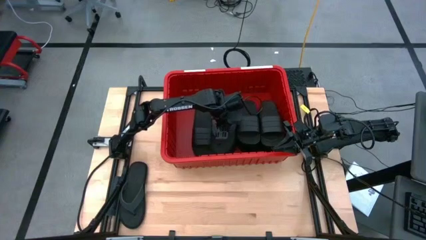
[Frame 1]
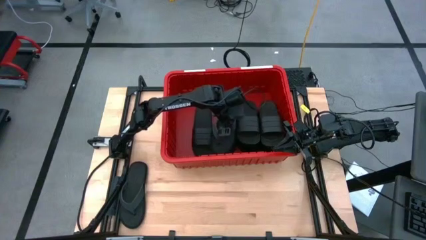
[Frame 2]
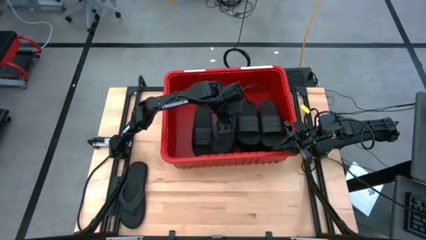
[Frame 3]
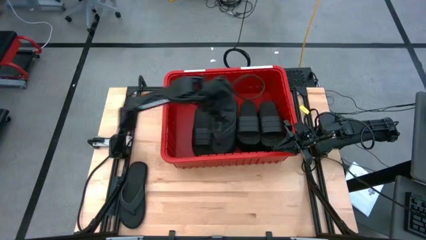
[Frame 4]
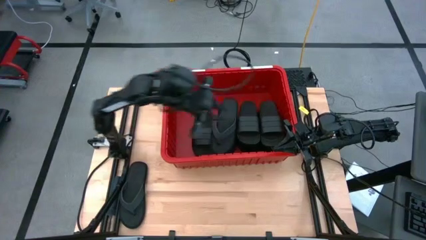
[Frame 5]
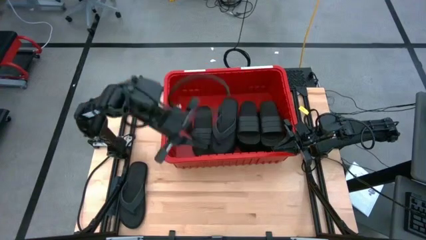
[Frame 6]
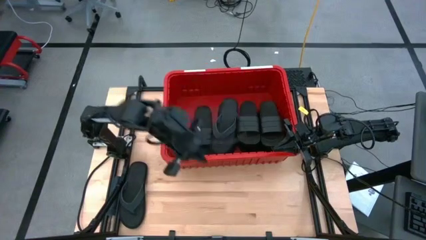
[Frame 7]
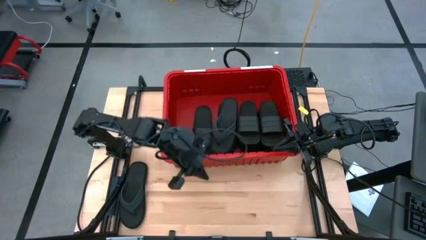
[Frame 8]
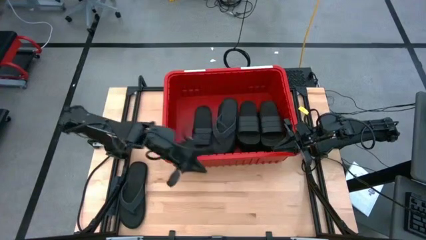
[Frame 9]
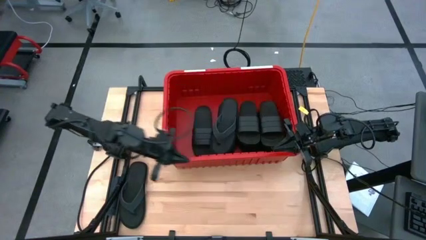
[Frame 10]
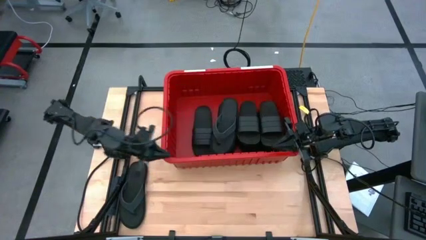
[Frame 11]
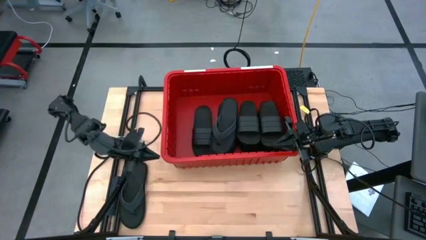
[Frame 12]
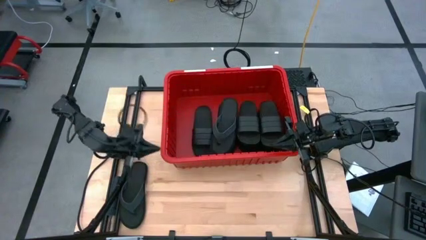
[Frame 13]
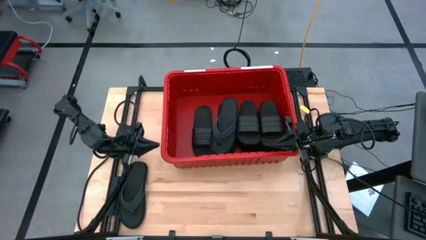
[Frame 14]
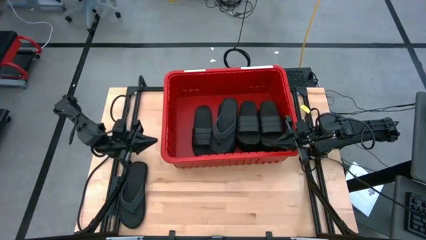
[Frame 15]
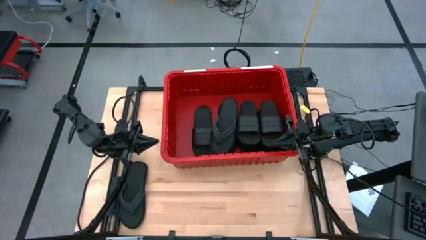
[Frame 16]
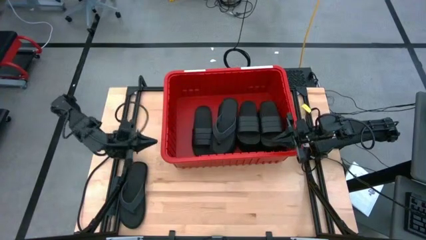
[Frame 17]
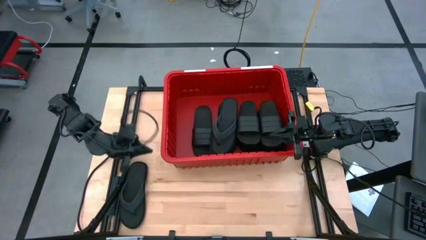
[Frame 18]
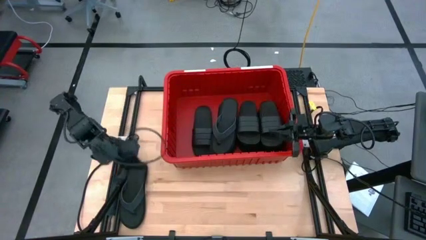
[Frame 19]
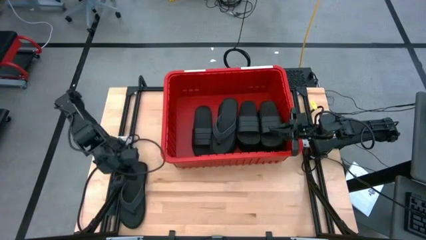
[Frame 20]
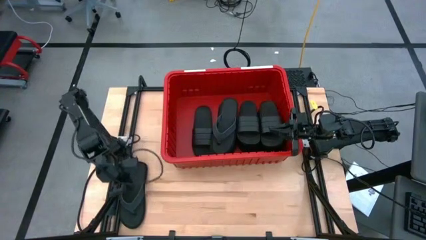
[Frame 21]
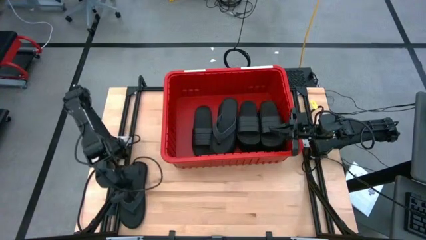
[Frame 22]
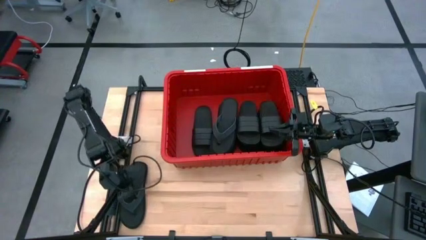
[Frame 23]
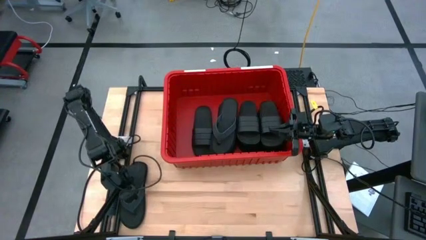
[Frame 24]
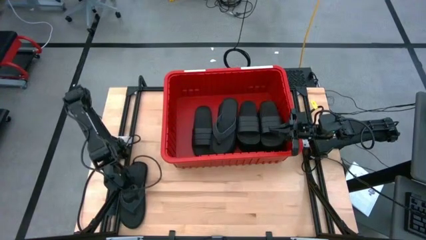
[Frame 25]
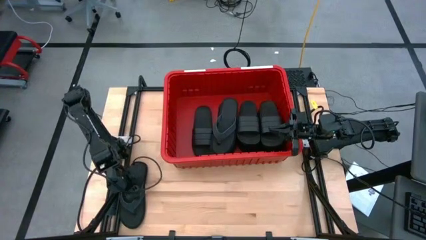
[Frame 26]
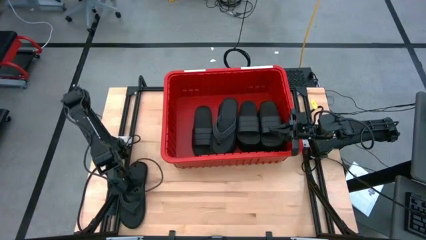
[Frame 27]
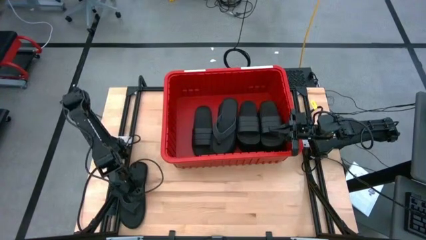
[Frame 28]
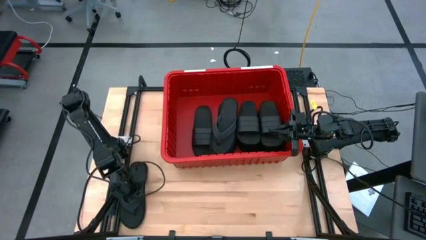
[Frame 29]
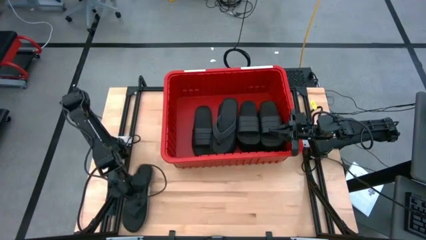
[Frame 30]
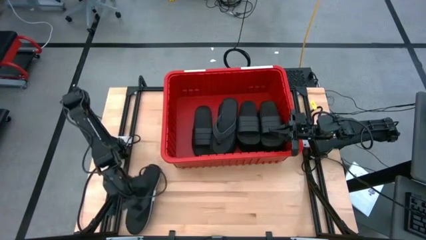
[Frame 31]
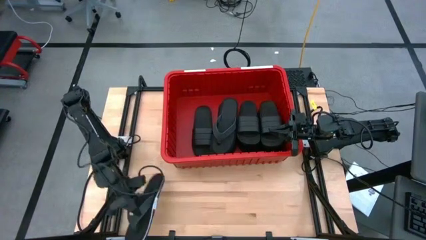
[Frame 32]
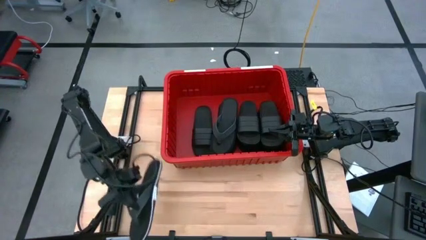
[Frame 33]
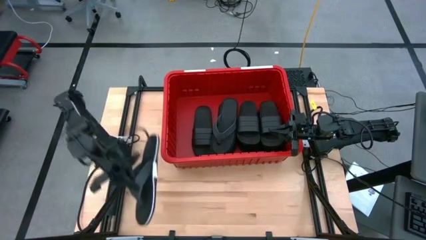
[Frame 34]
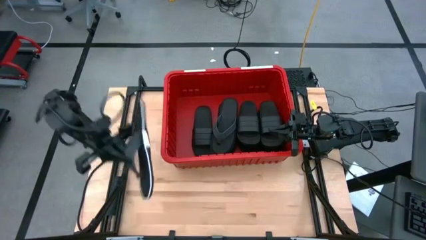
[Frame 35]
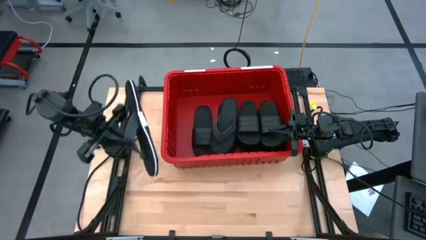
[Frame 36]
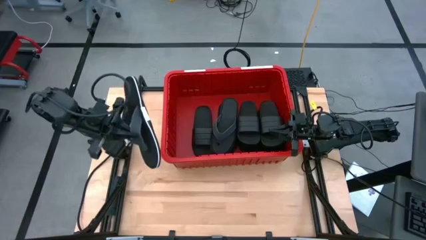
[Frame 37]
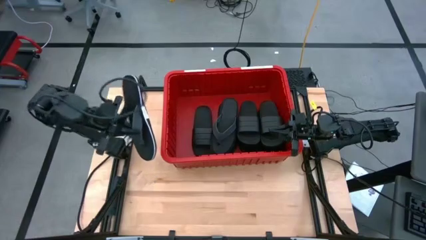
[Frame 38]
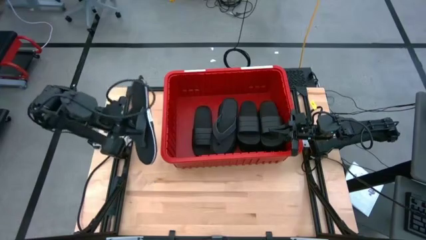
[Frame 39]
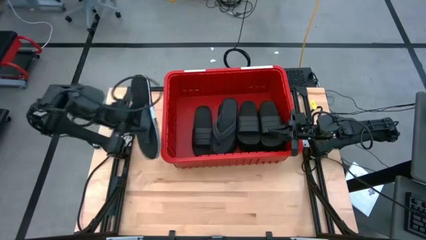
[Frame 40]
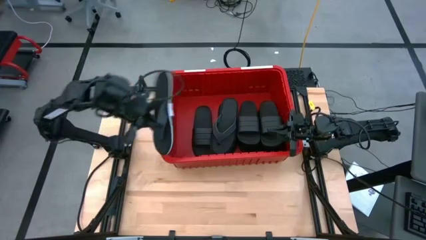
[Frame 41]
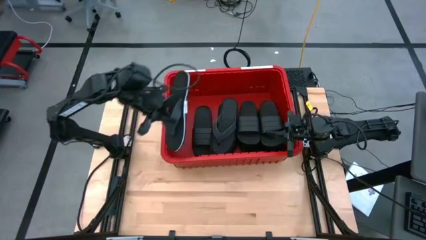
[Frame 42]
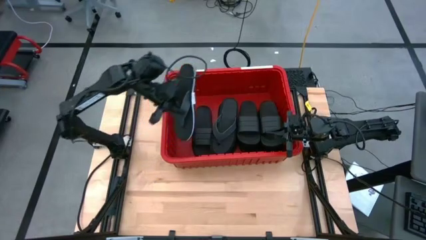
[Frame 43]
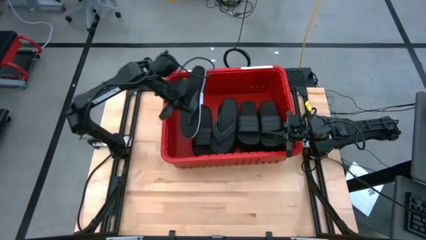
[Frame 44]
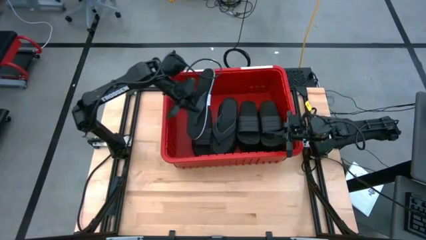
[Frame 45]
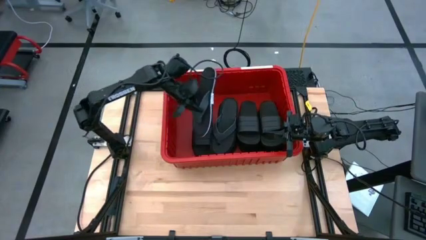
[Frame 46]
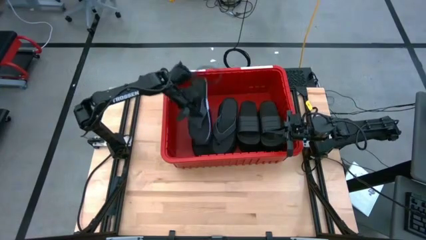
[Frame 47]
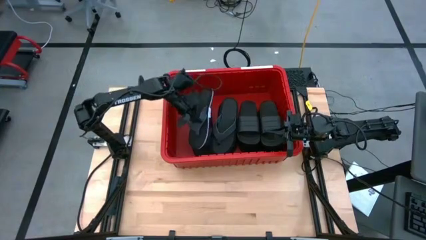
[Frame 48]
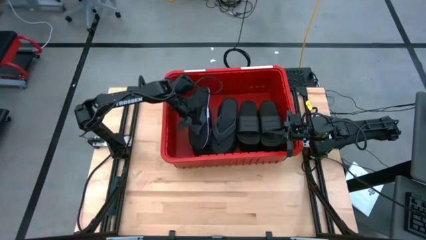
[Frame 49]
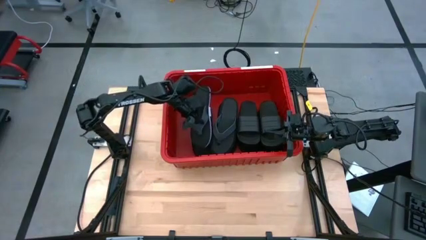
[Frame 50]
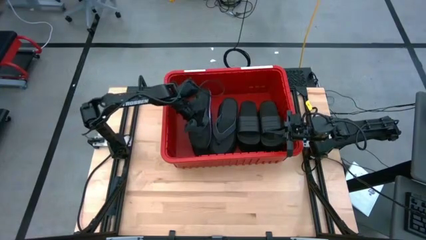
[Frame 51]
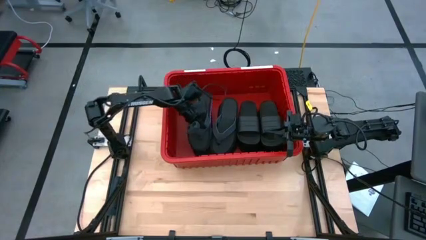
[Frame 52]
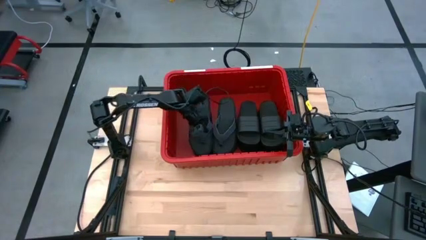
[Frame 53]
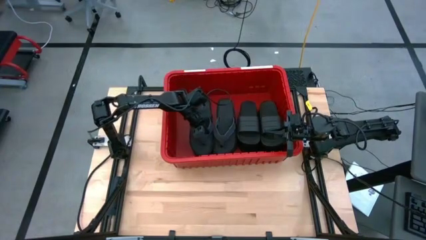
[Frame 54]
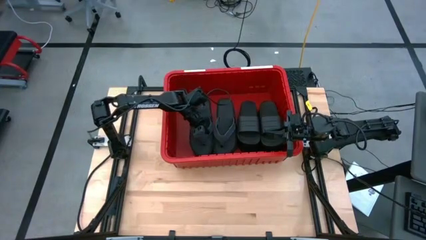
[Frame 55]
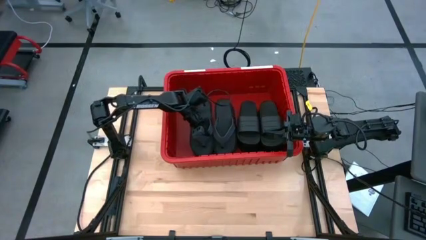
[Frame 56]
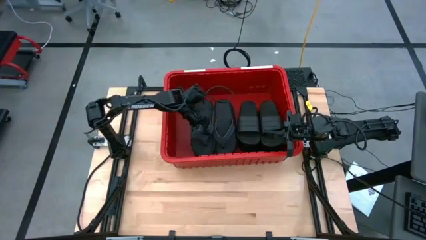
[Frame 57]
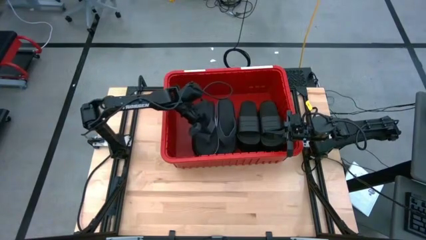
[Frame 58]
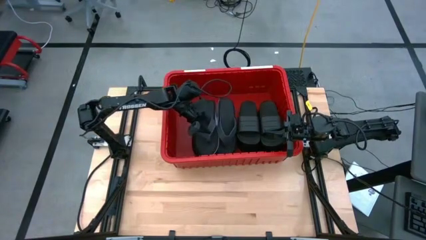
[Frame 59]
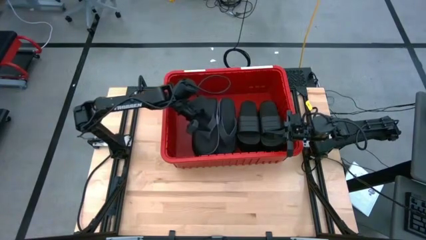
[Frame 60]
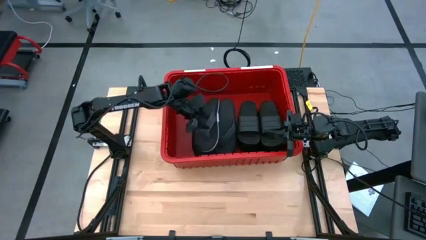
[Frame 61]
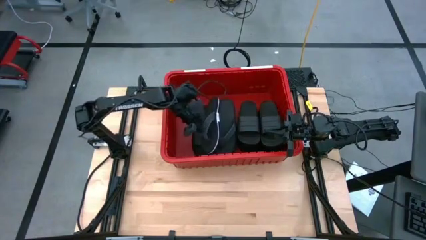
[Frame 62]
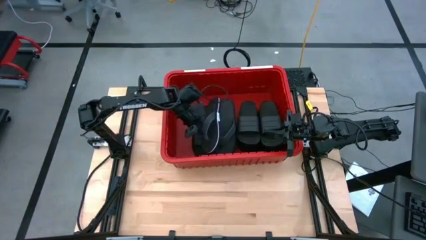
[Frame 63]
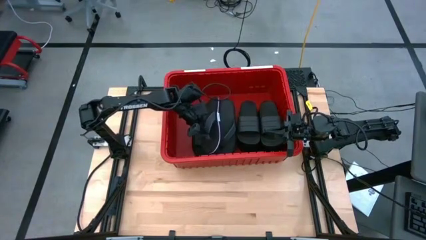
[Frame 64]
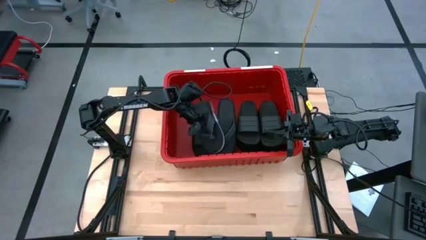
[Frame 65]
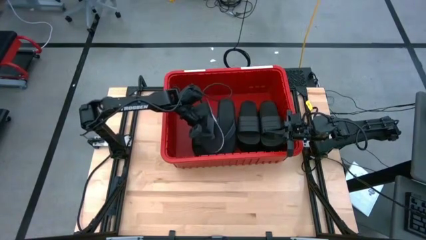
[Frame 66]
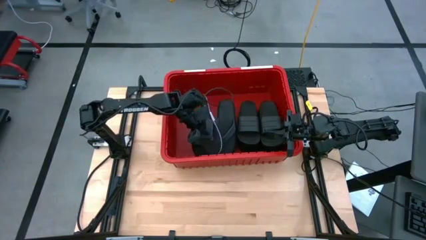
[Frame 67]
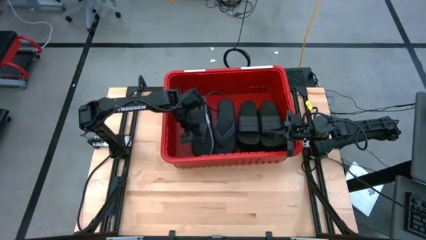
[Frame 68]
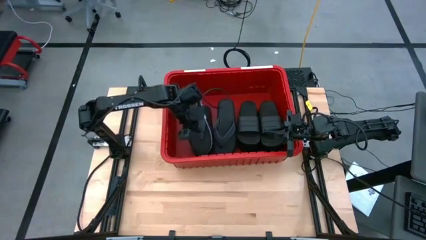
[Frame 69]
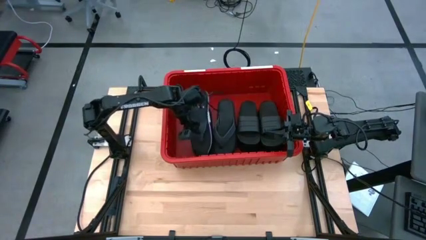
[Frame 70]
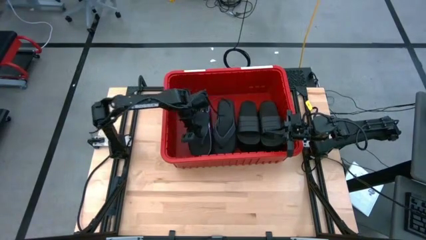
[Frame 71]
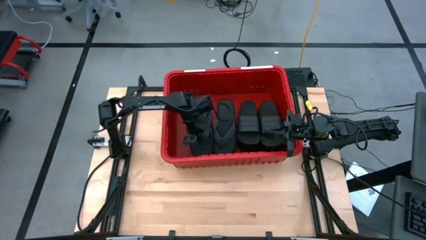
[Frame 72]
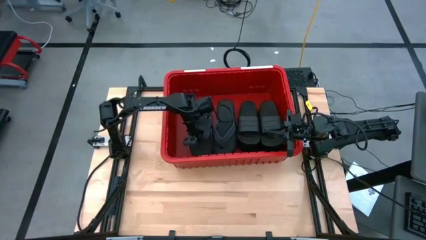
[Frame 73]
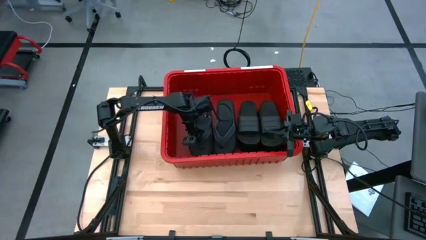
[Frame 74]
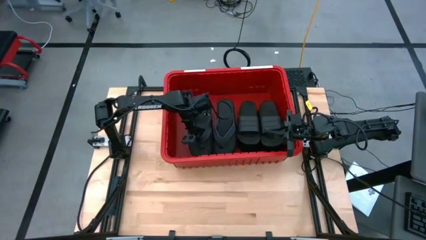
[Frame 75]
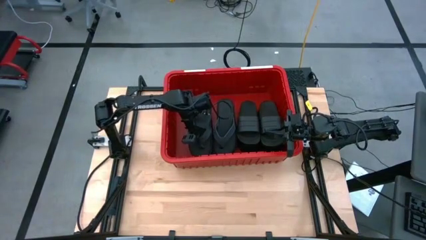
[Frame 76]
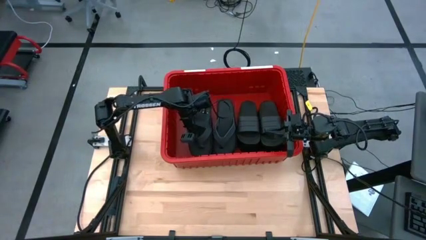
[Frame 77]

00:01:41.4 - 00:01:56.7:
Task: Pick and place slides into bin
Put the black slide into the red bin
